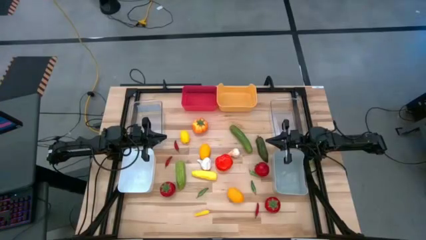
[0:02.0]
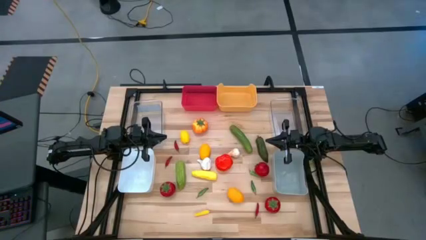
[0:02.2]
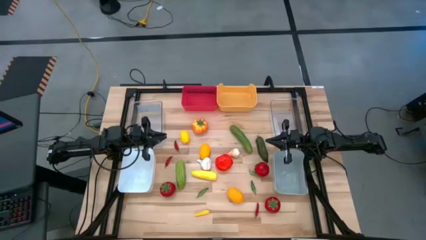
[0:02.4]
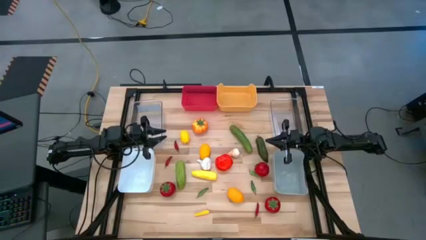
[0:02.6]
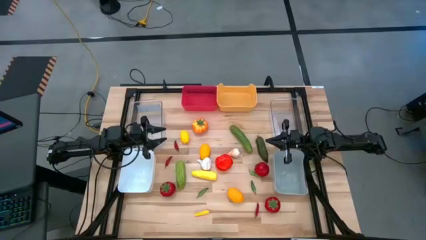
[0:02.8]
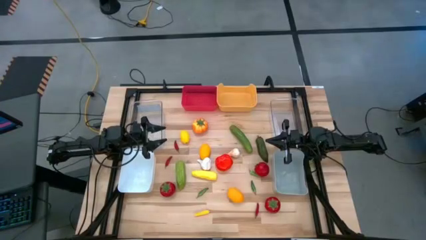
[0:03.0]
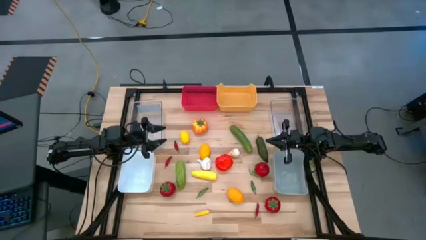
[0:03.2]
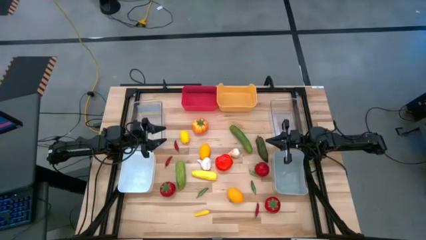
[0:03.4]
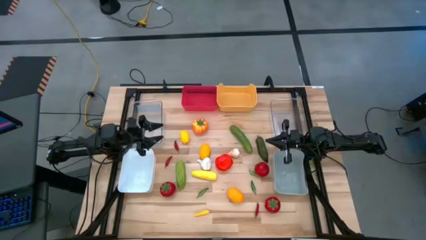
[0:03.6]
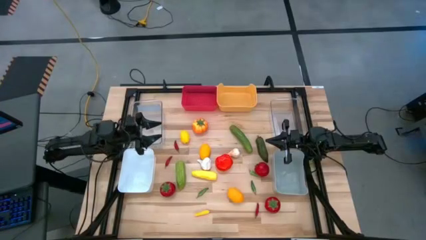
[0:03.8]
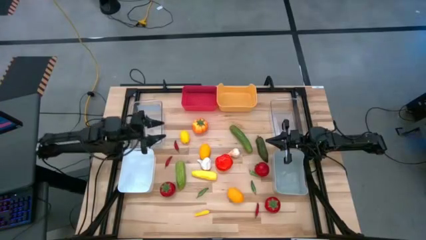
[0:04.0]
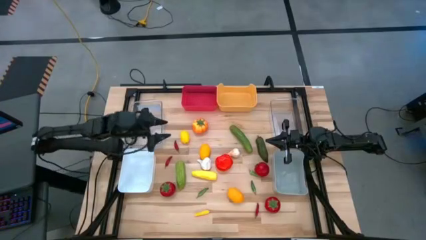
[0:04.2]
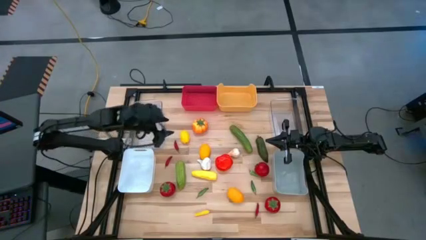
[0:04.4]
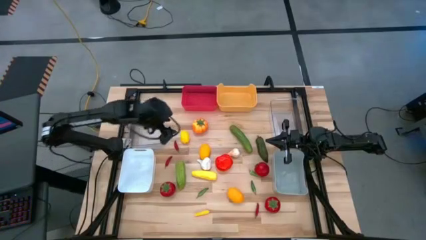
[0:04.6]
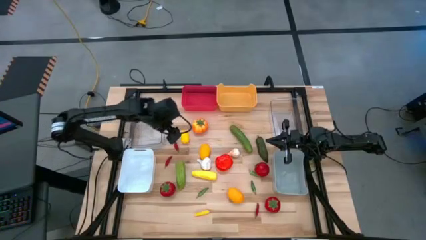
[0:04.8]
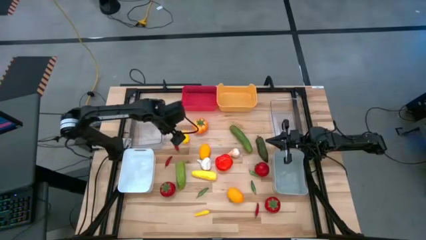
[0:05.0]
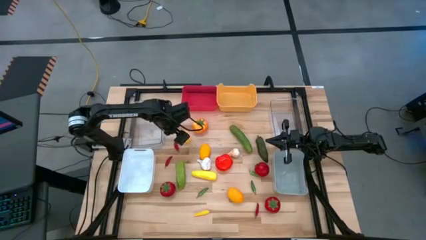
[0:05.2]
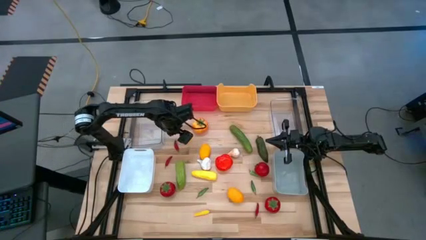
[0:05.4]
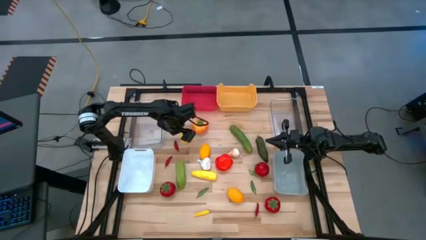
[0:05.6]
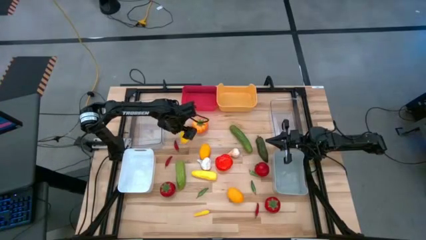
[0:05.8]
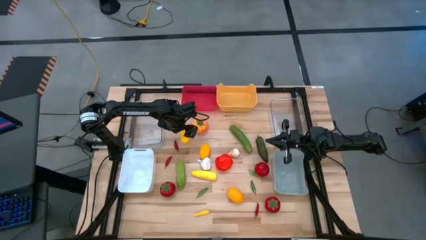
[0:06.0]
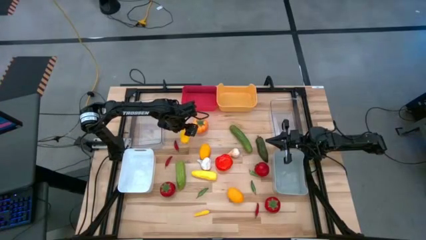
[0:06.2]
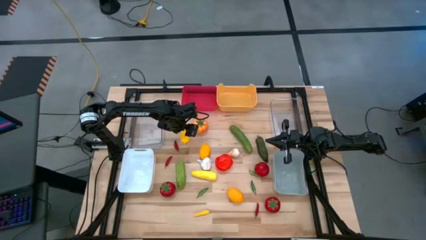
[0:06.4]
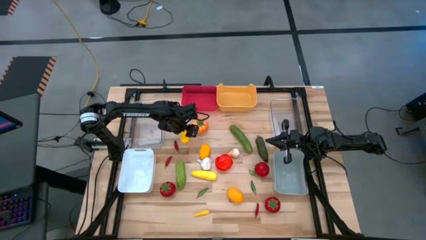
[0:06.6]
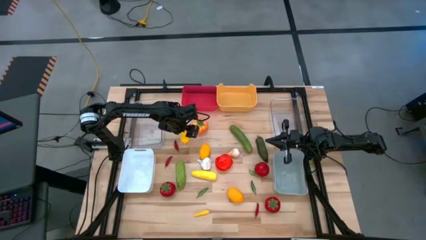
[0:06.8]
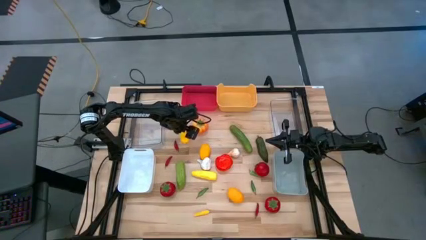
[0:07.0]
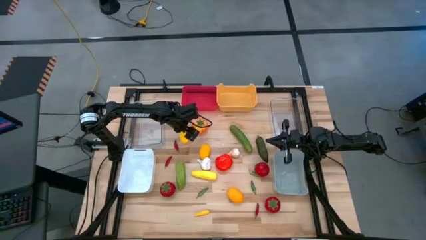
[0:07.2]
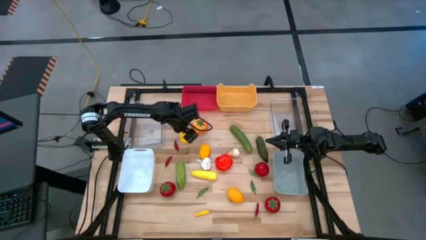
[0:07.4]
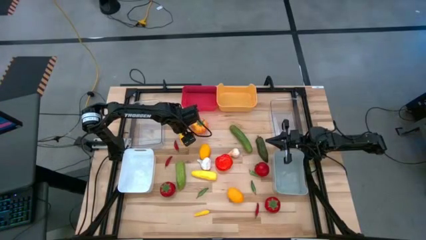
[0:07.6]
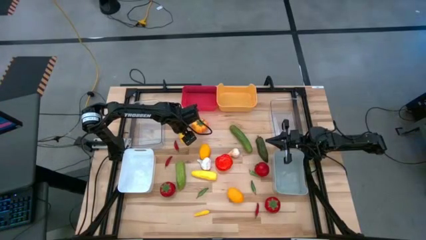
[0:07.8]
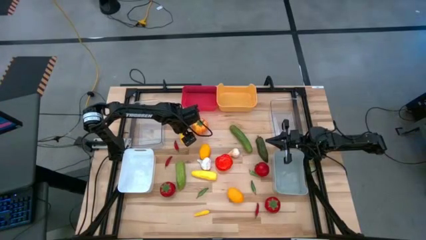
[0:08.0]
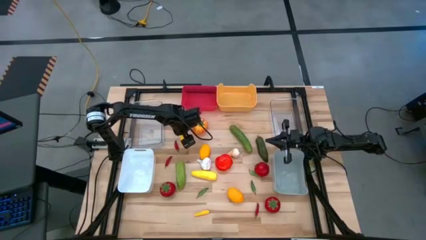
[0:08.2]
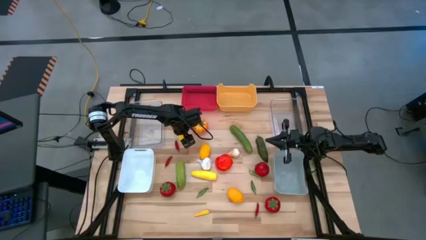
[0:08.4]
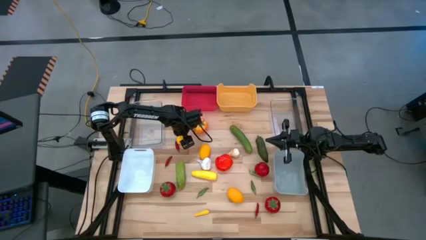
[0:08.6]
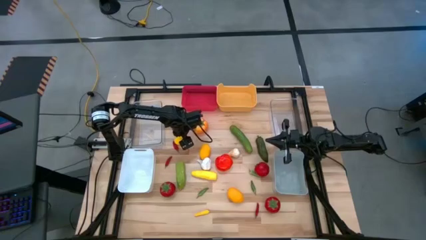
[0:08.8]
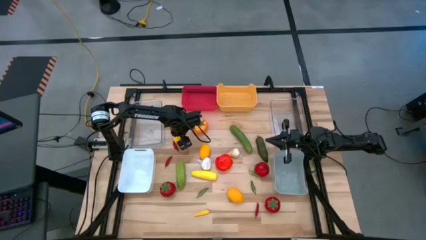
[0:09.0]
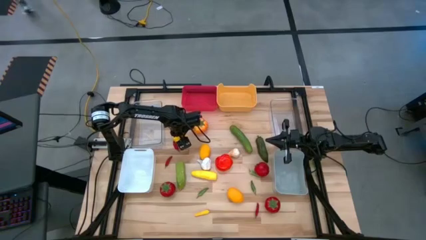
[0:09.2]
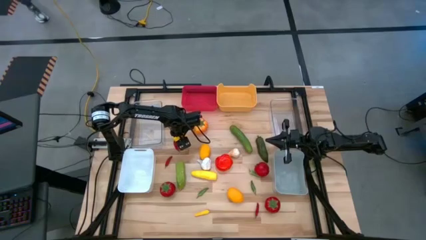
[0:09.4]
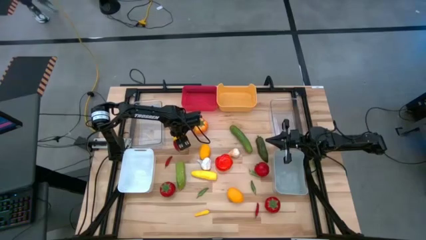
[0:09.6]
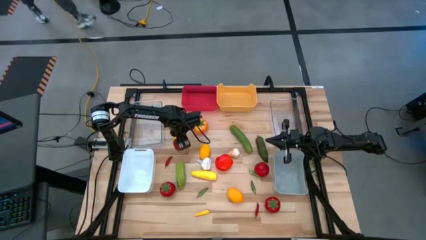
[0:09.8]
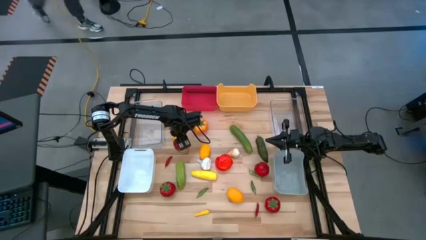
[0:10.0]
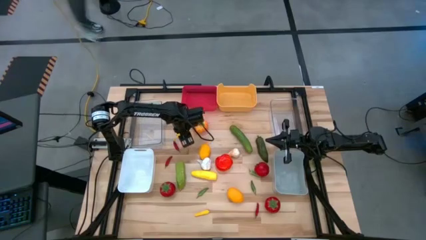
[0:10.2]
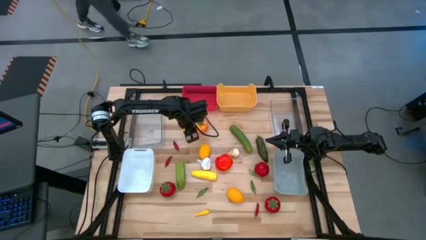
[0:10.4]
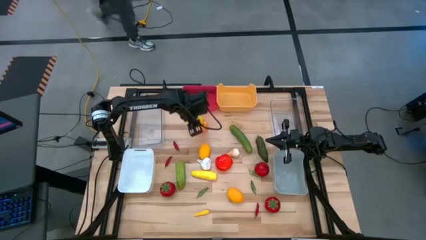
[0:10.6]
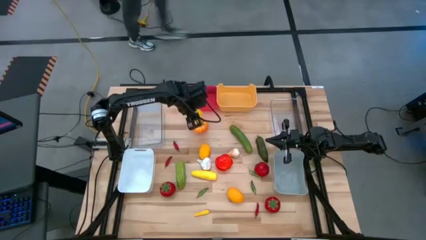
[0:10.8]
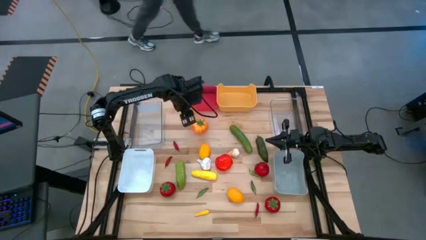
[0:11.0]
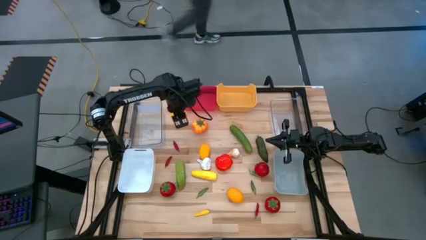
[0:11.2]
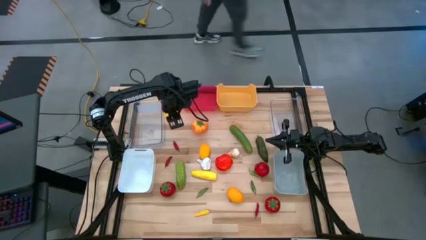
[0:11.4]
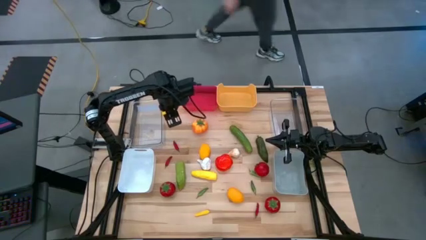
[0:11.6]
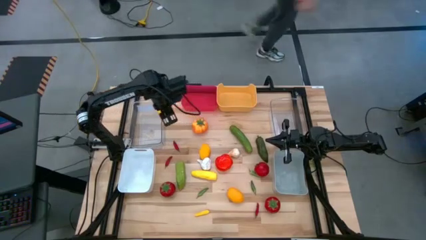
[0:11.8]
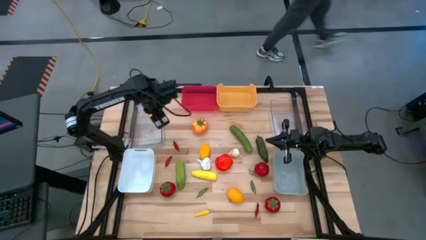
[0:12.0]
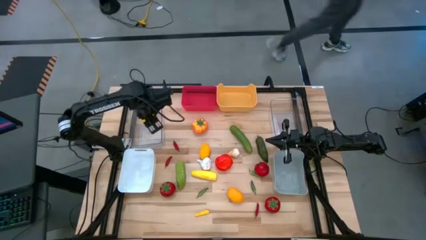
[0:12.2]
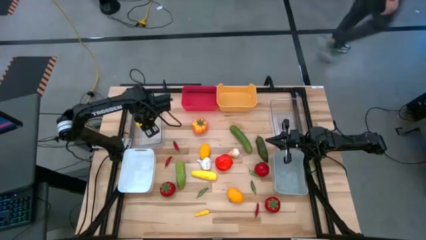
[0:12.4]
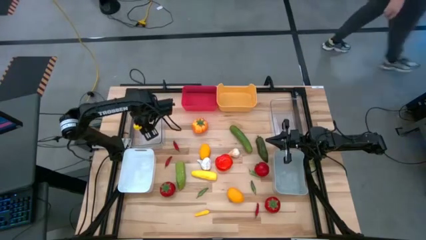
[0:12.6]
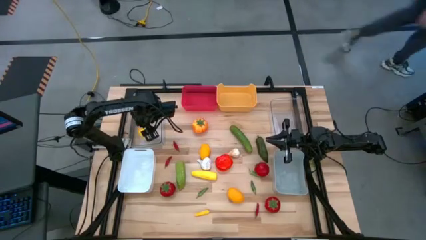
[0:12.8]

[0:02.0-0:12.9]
Task: Sort produce into baskets
Put the yellow lemon into the left transparent bin
